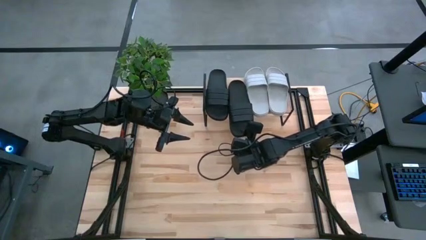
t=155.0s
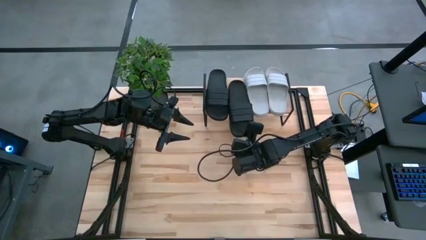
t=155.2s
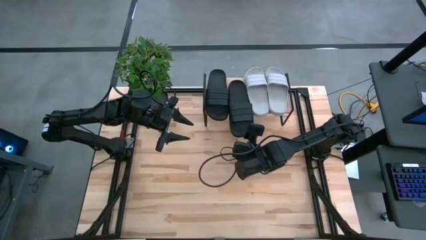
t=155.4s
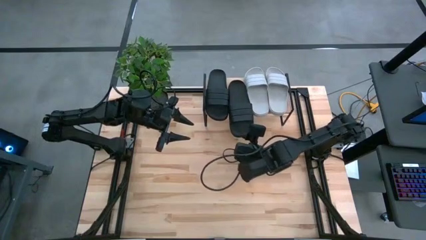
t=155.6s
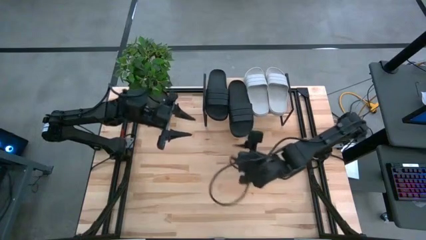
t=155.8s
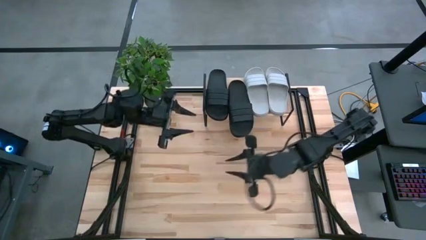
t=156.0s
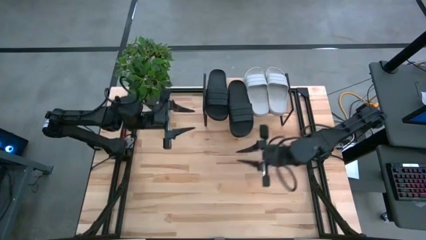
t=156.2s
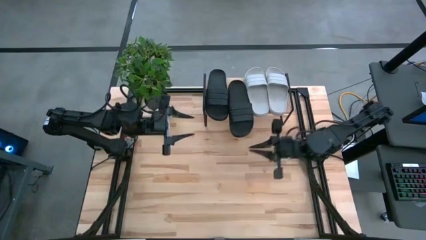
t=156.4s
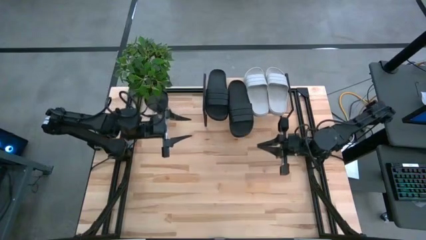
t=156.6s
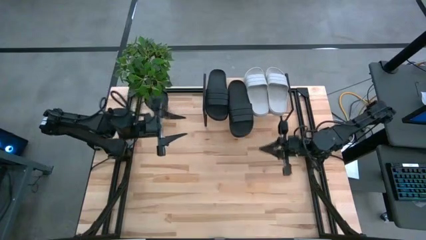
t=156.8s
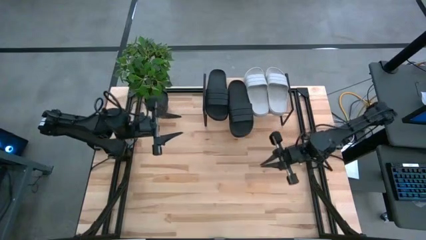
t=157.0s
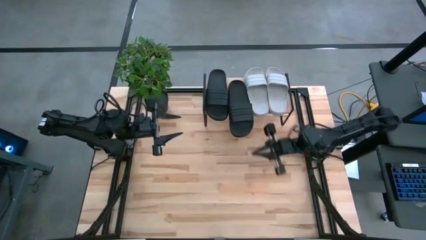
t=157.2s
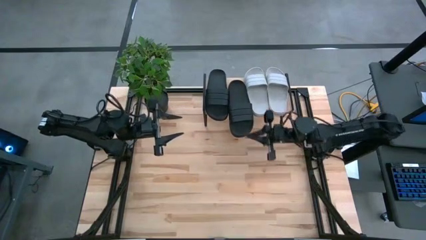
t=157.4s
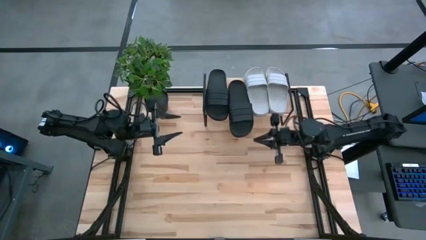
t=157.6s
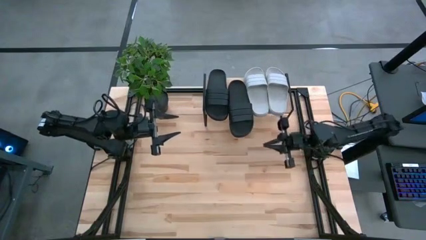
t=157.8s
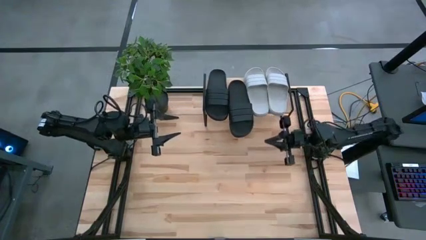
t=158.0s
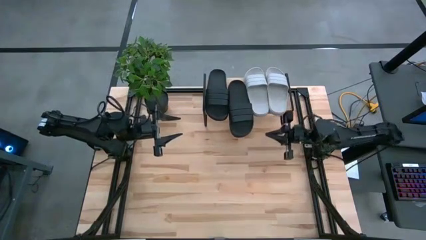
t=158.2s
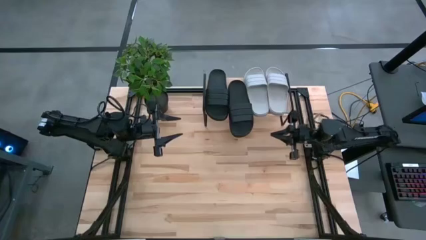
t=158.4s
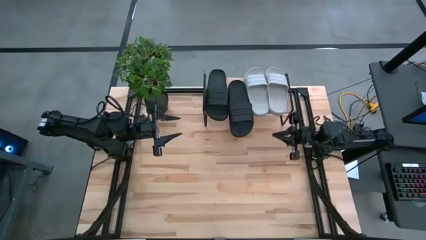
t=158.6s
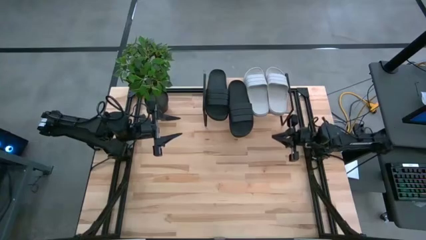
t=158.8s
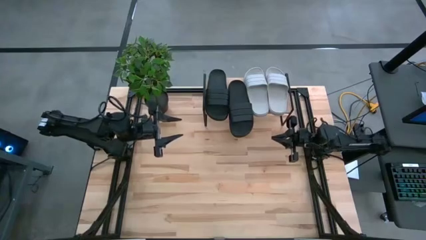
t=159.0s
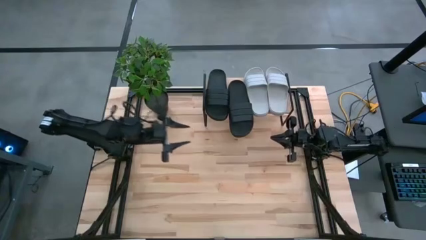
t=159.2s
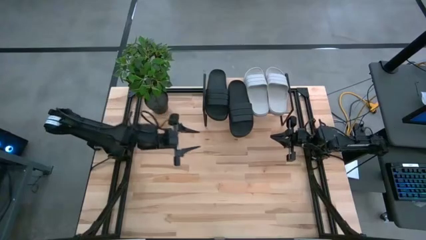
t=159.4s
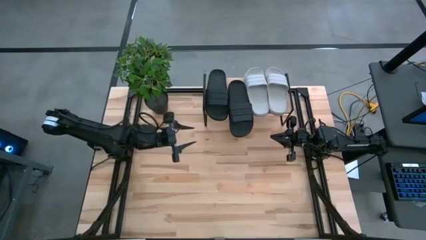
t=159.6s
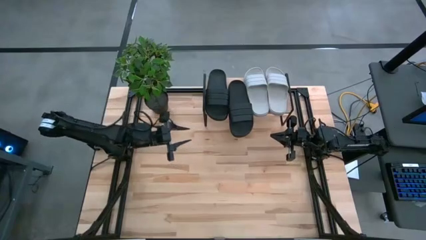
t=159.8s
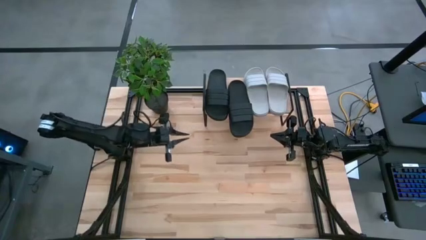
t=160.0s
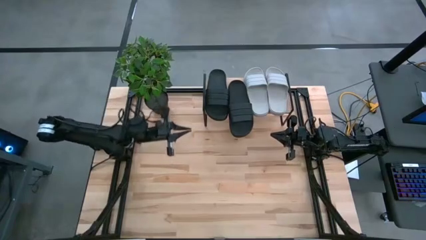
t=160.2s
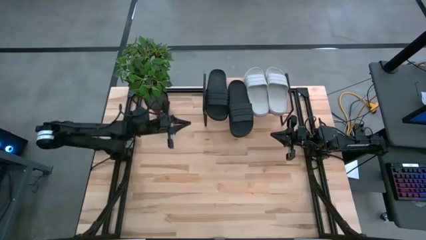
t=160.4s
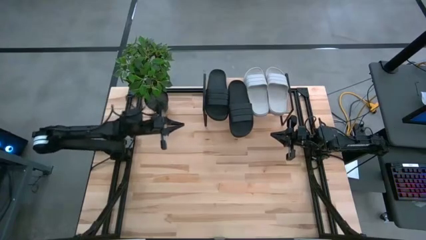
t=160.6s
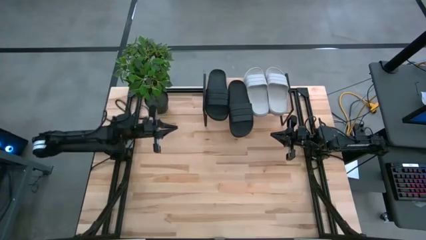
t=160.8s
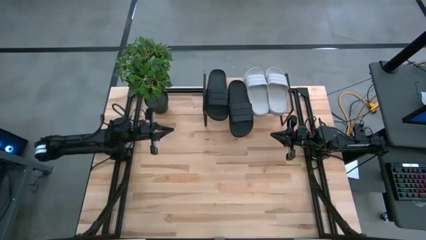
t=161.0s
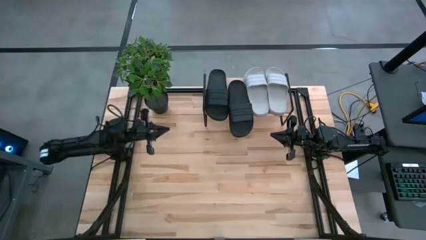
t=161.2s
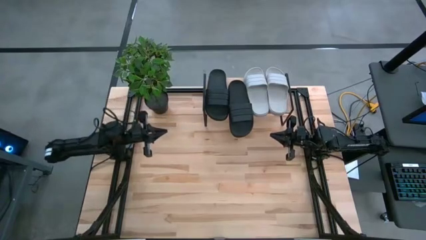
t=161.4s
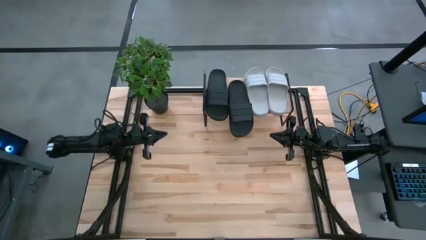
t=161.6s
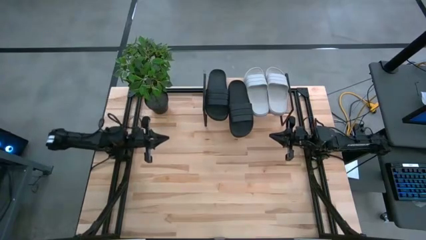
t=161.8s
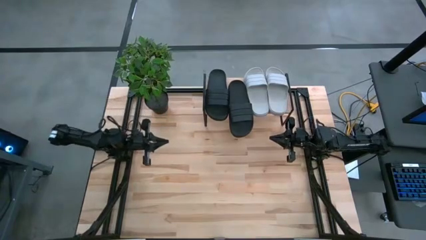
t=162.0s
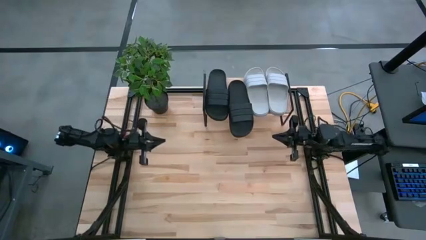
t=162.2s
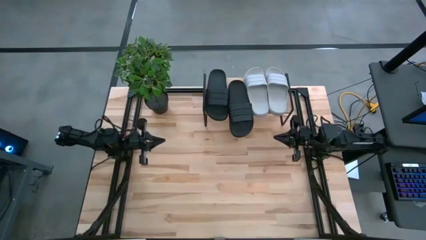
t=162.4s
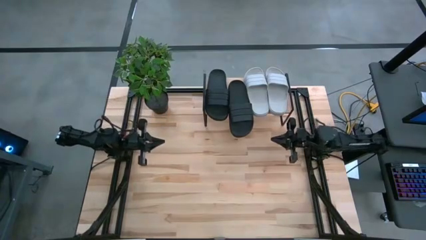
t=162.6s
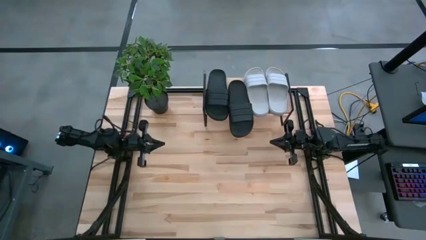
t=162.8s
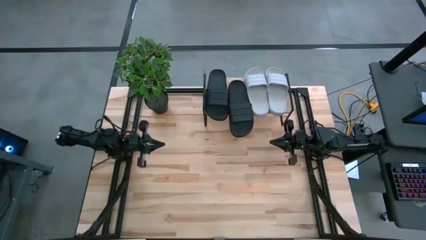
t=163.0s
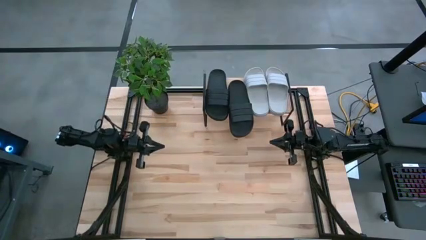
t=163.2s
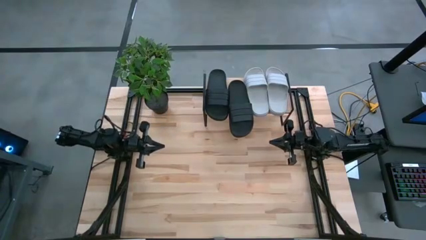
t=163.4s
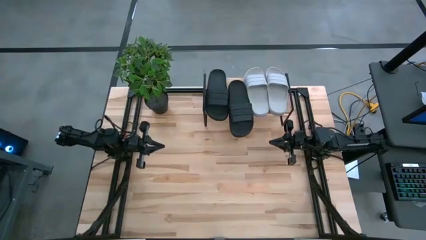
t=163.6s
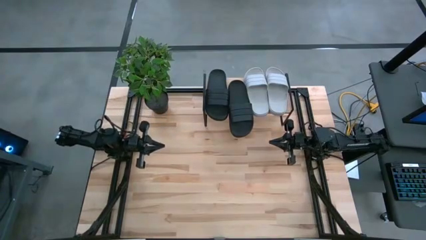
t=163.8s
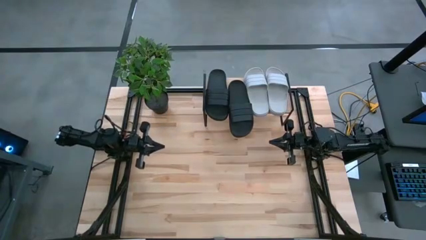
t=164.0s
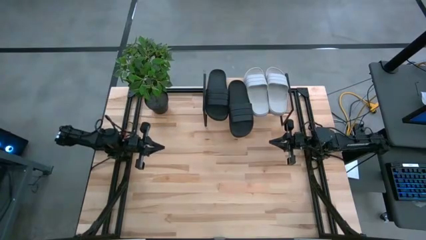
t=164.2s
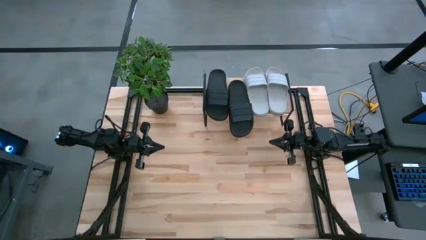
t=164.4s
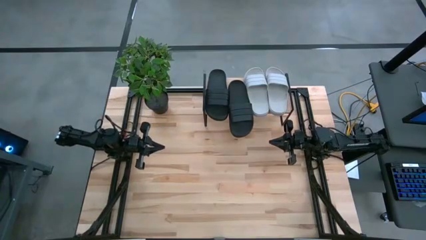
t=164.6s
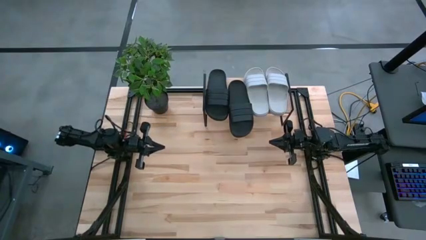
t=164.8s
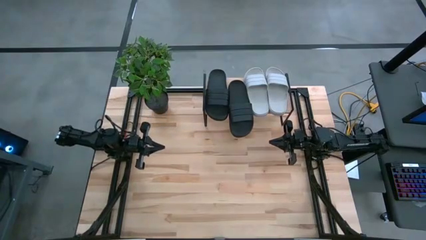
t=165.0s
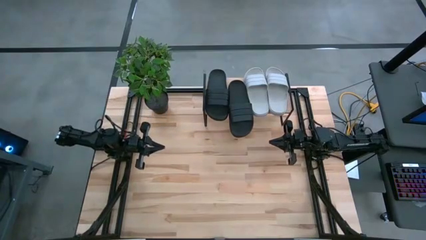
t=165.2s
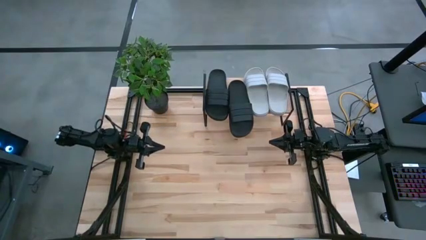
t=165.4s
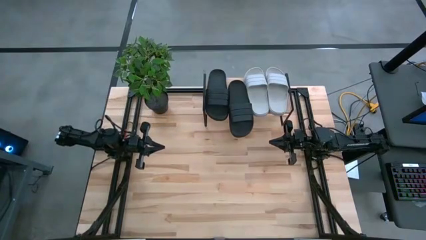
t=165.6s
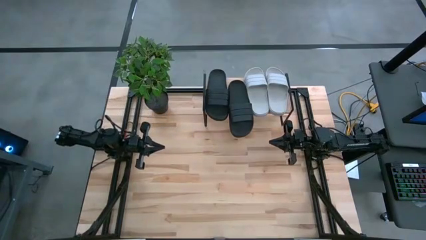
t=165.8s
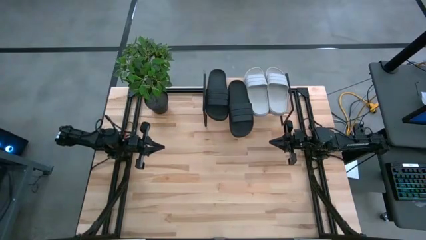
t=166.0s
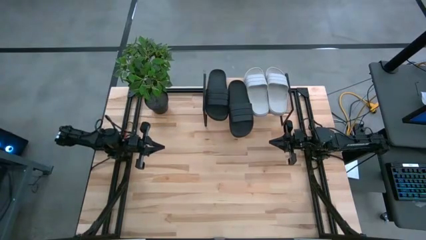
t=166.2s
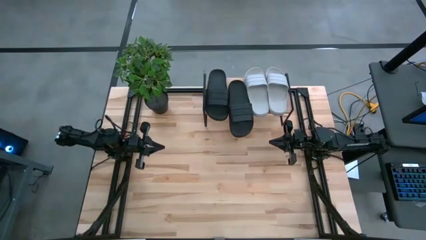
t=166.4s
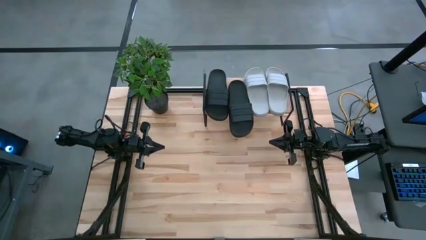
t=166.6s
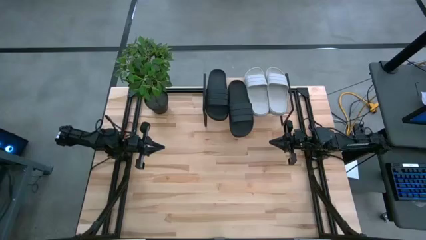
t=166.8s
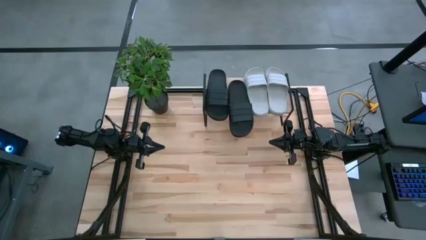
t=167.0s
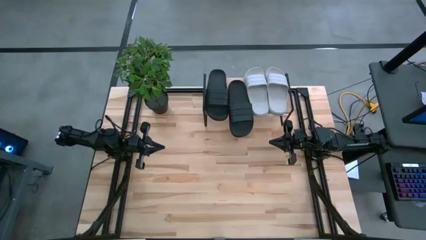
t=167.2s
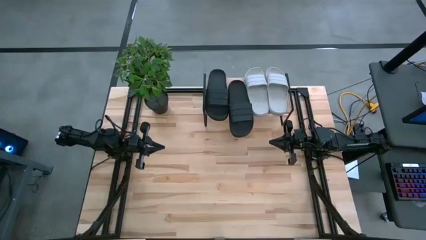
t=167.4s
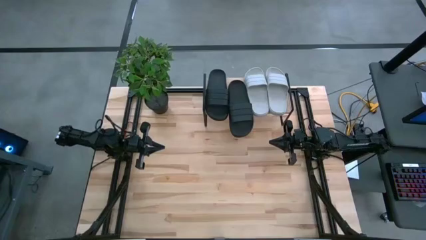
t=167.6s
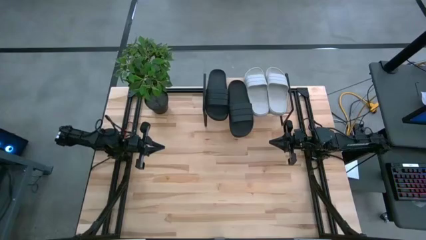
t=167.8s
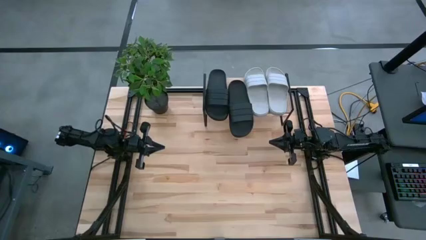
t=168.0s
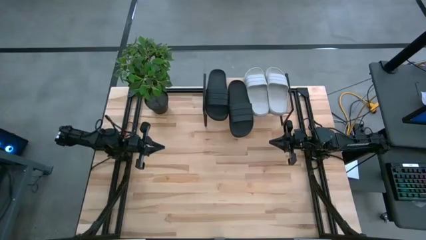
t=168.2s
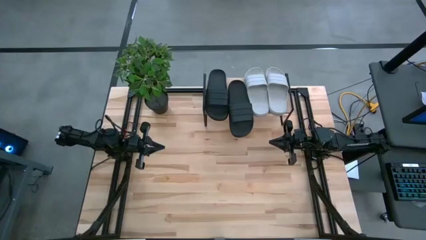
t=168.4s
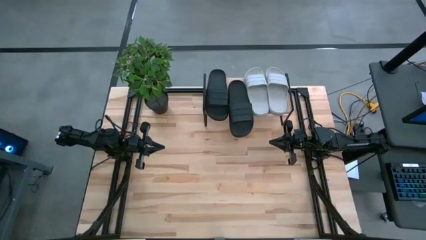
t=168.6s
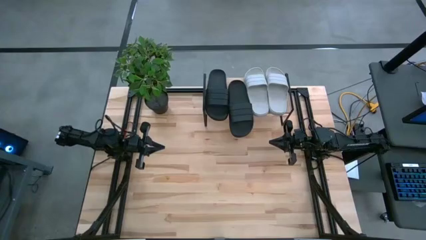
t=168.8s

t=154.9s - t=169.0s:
Task: Pick and place slides into the shelf
Return to Home Position

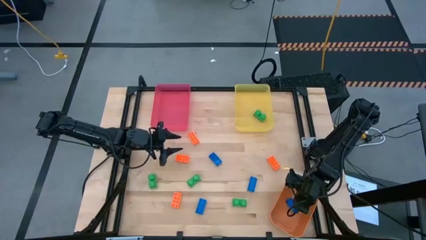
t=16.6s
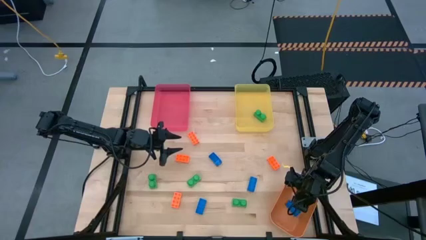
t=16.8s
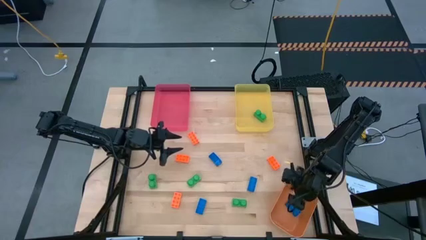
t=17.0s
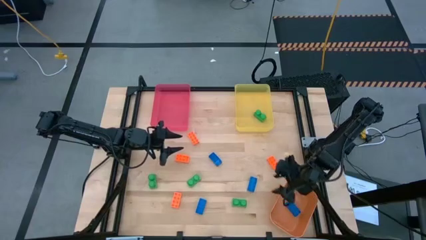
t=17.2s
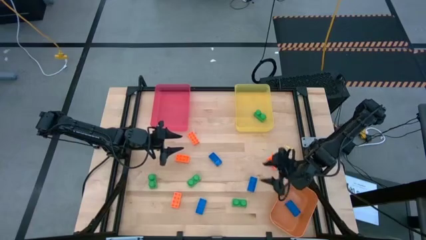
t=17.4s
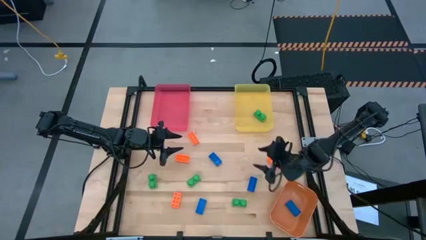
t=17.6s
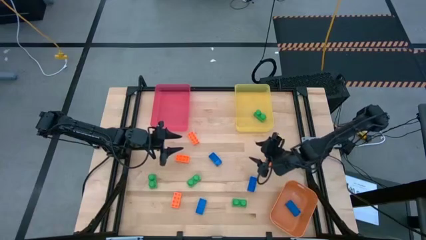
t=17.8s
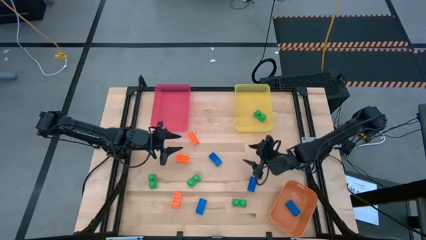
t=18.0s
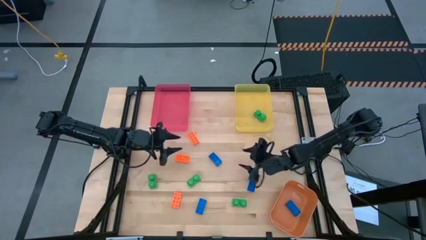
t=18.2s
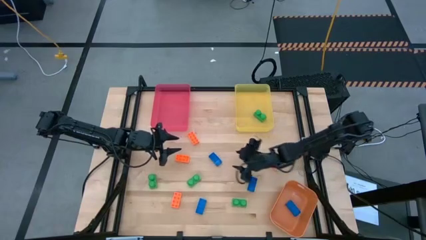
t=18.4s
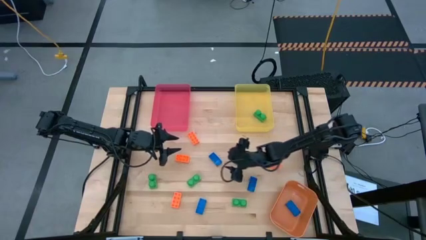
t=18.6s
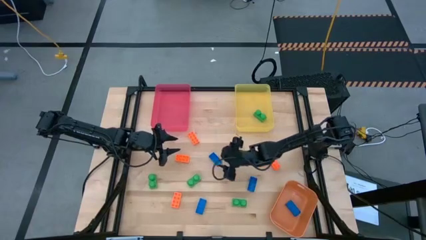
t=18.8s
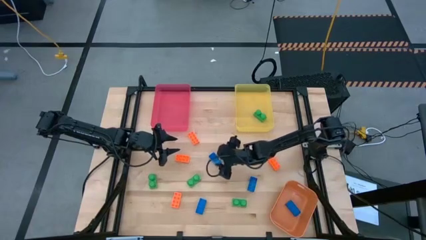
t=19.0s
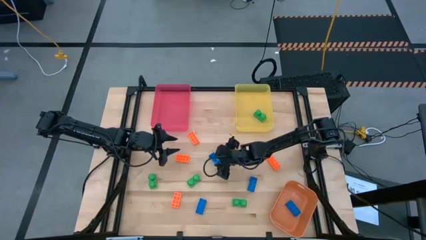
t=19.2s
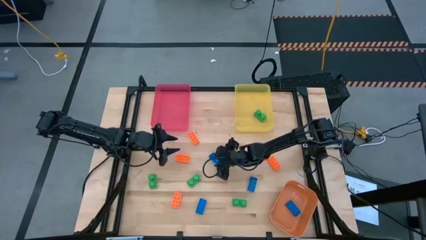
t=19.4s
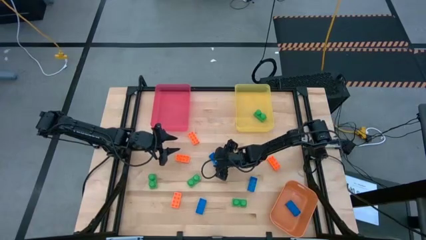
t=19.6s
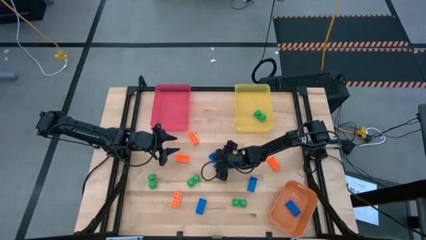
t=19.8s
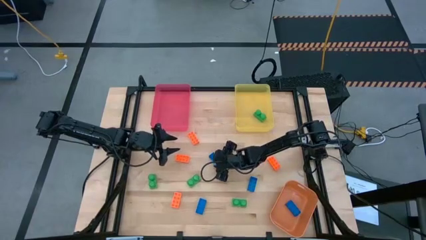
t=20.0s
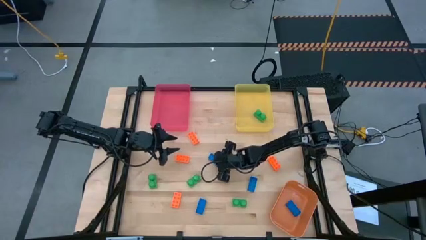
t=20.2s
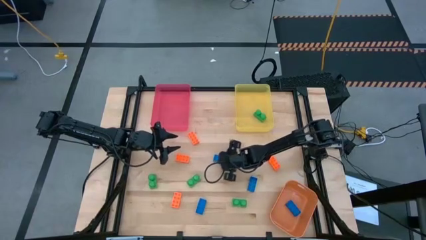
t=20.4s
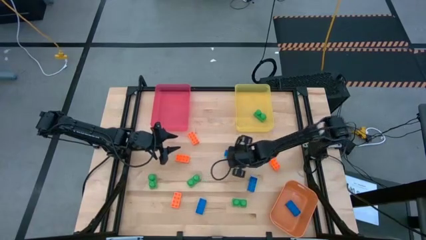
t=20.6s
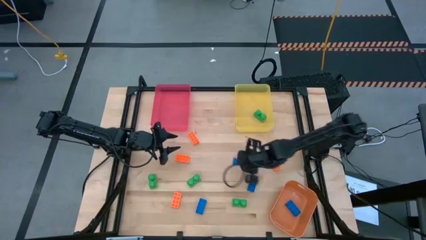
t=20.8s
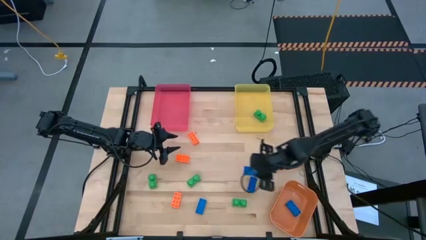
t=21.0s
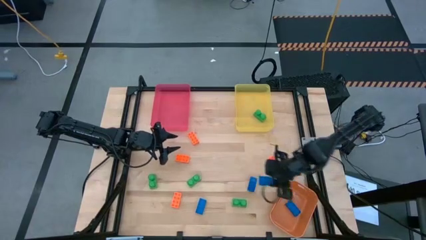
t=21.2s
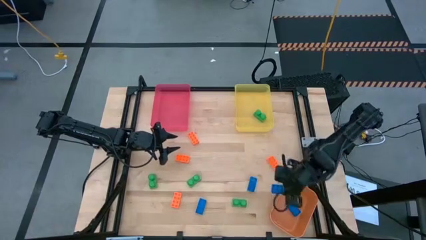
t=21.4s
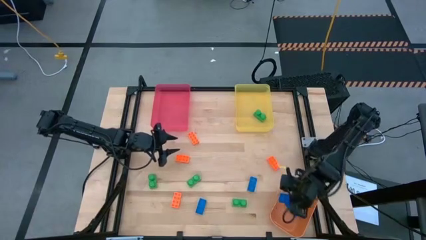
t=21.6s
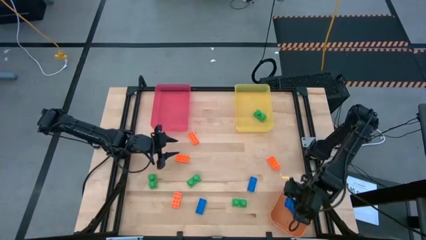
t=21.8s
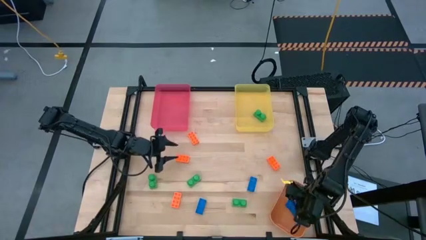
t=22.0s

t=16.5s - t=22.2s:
Task: Sort & place blocks by color
Put the center blue game piece into the orange bin
